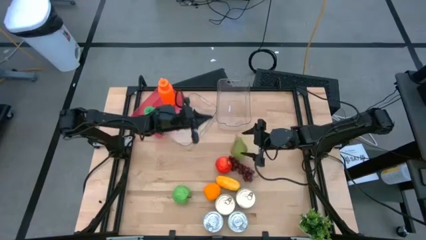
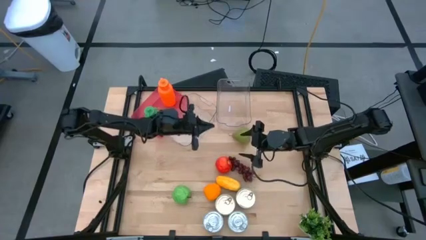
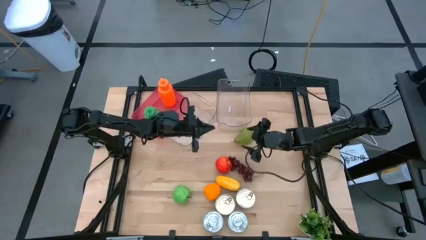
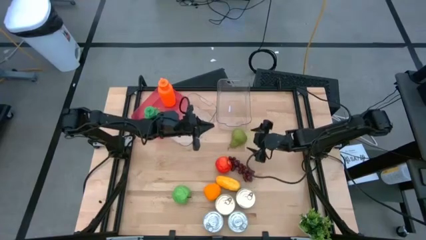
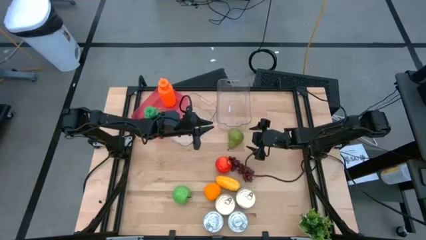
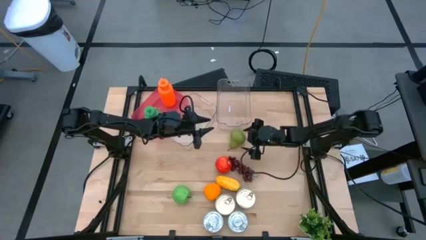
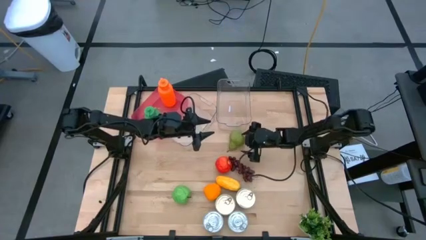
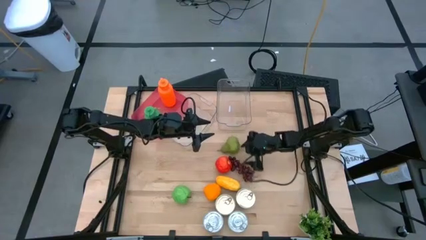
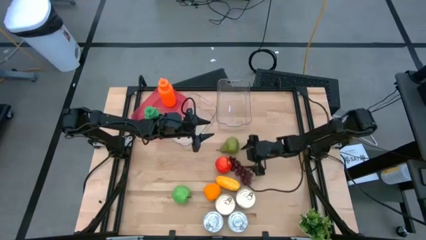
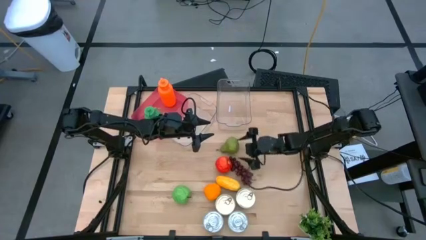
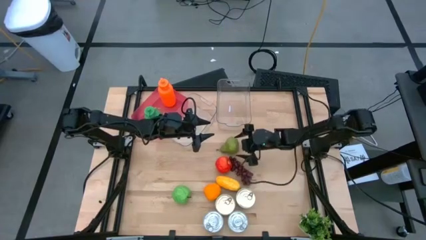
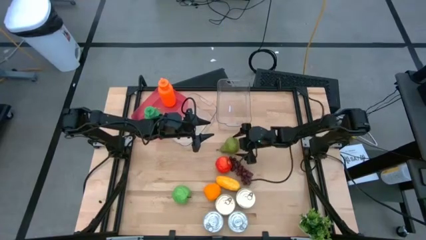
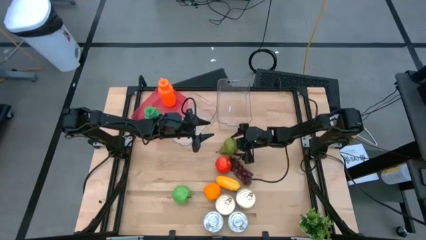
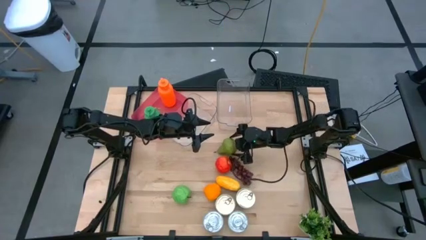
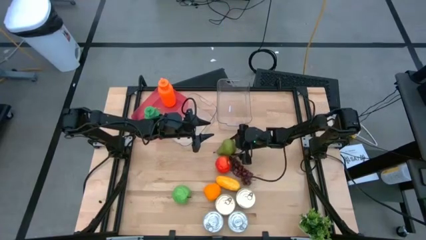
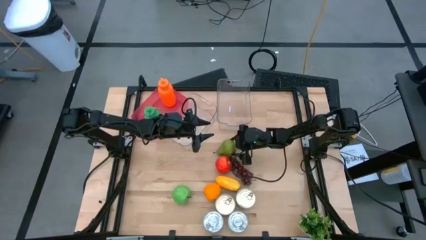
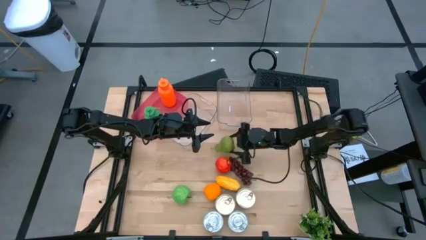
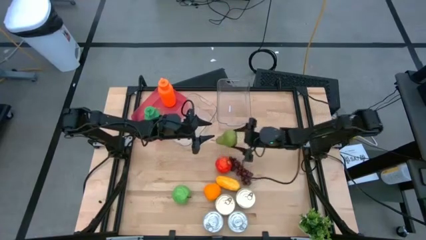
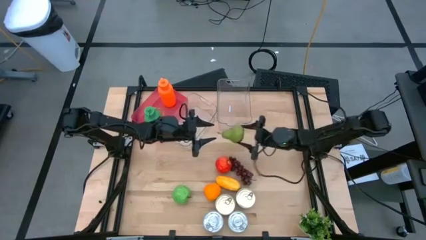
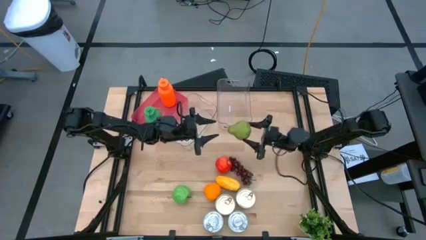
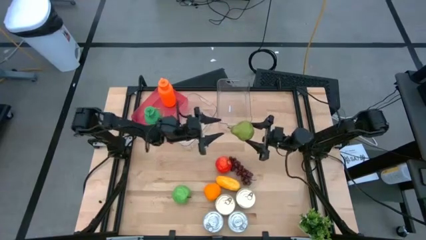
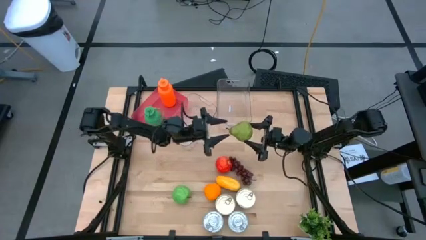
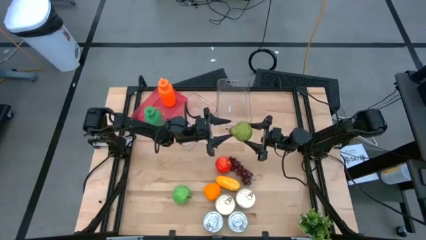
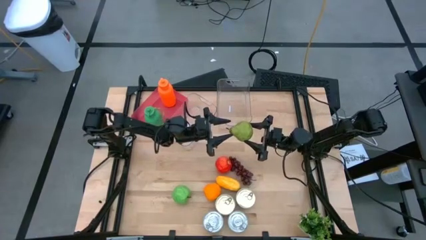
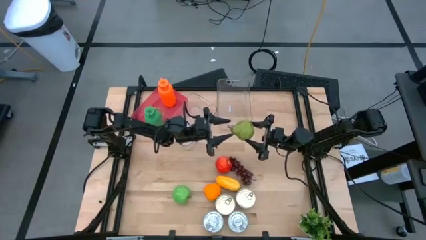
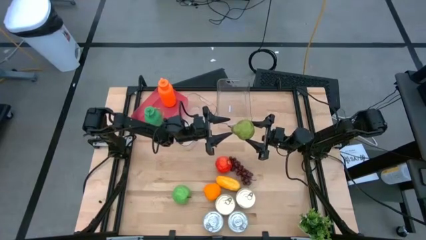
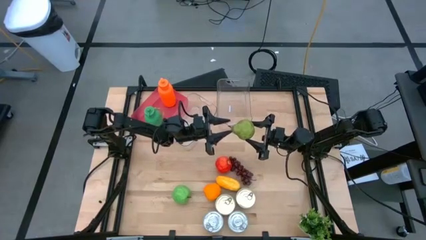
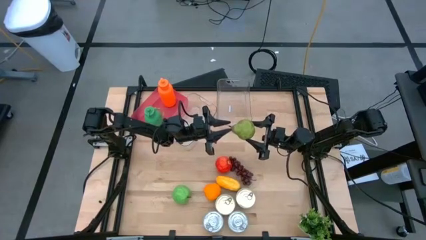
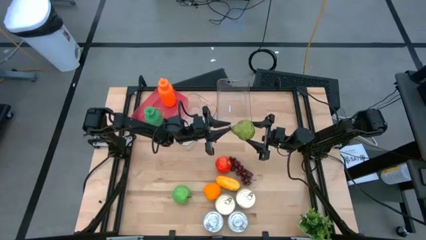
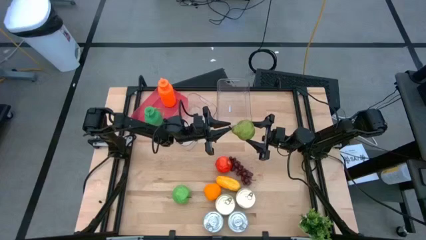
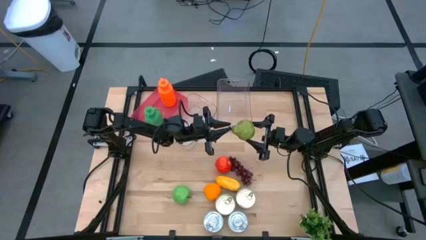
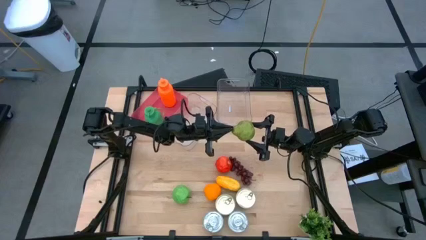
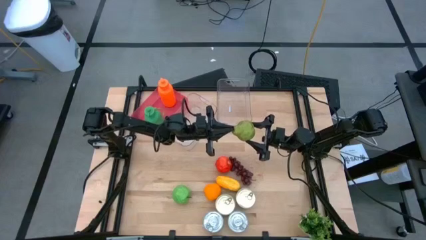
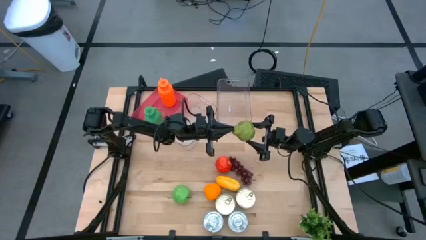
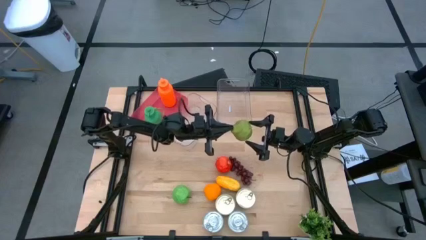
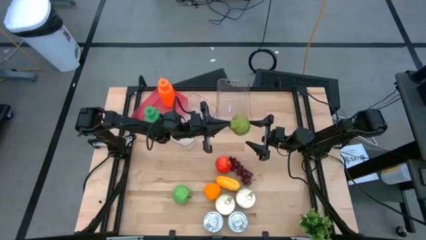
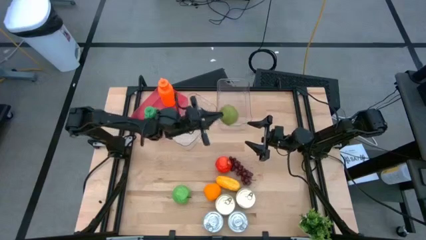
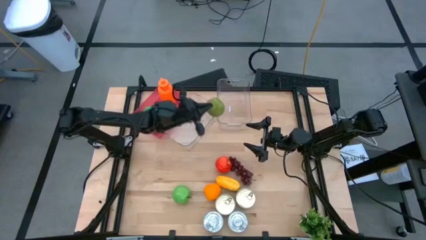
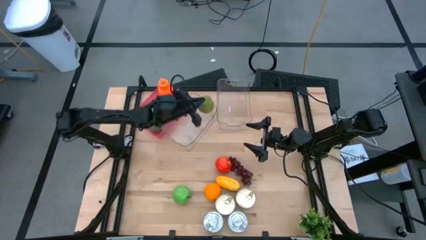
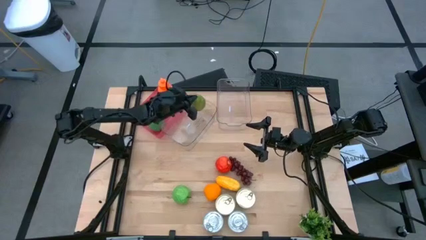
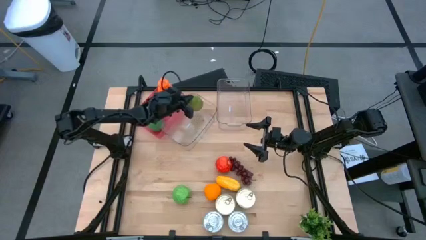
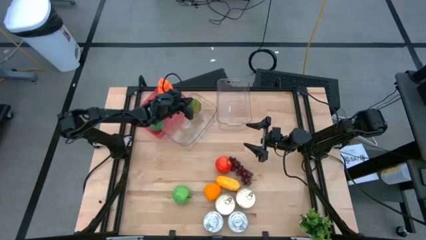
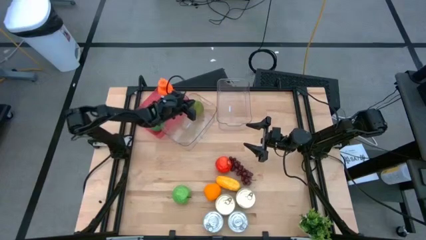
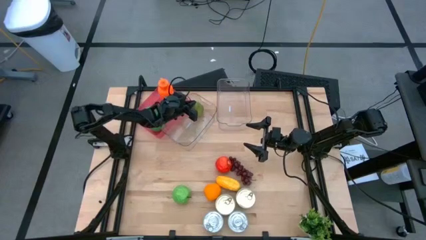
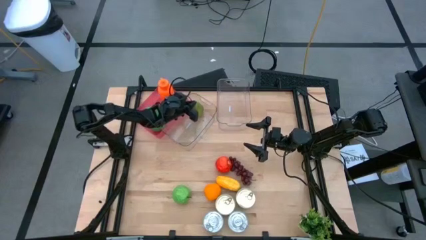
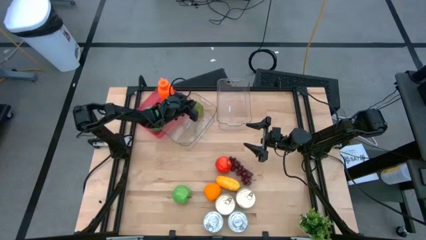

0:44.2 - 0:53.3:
Task: Pick & Place Food Item
Put the green pear into the left transparent bin

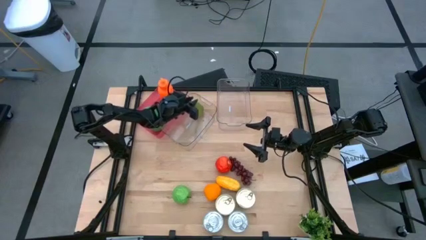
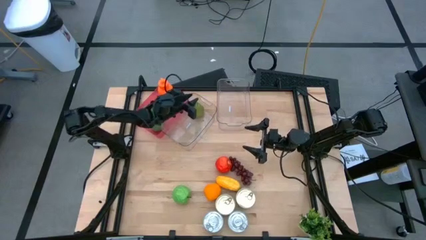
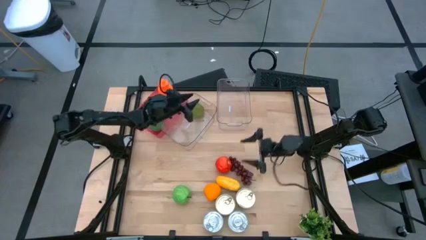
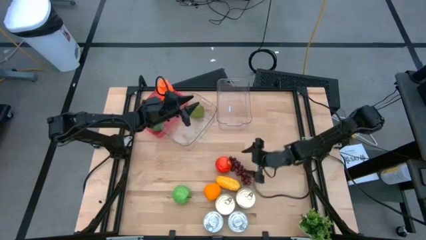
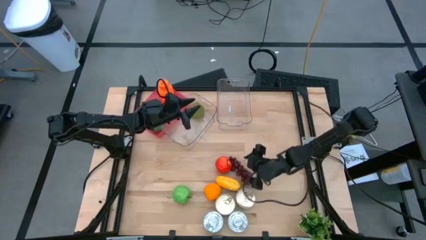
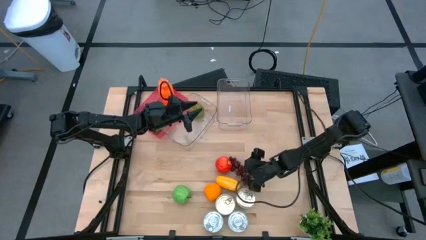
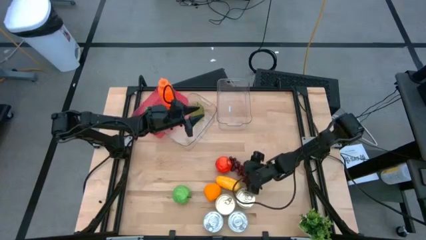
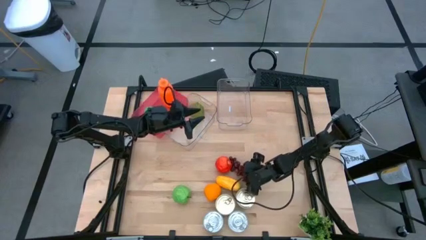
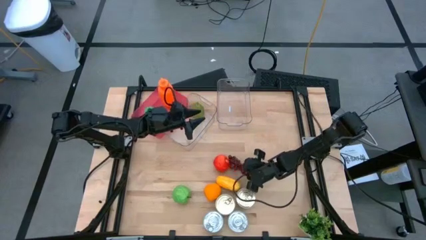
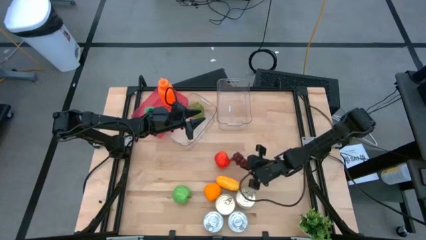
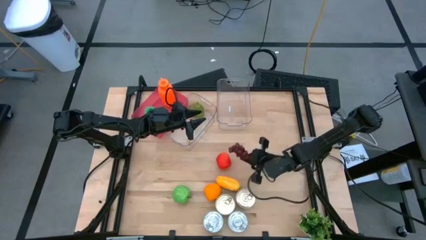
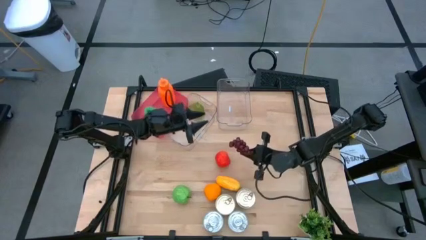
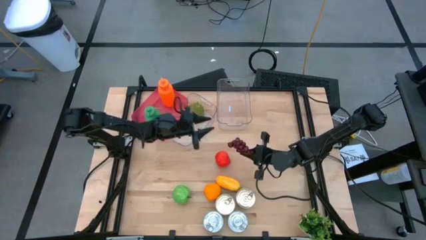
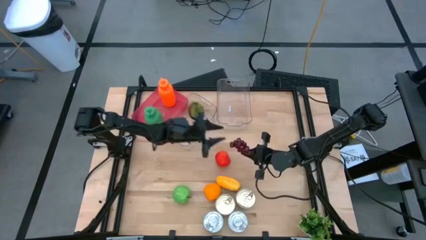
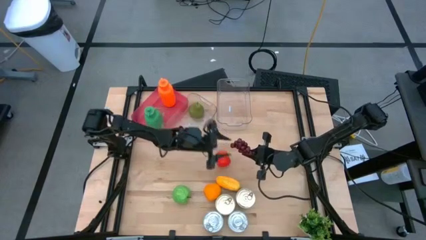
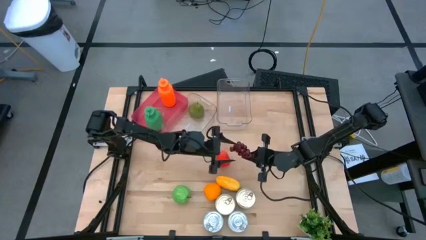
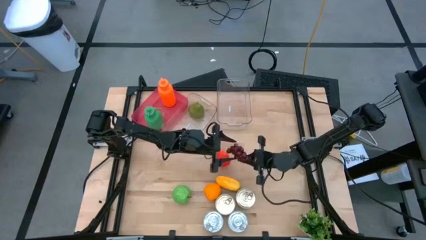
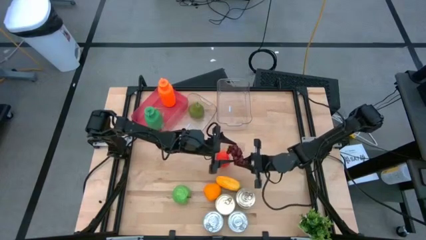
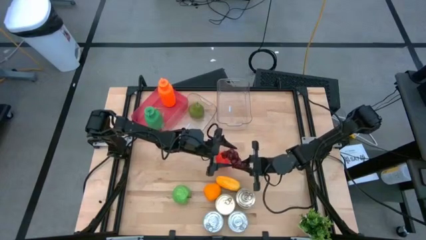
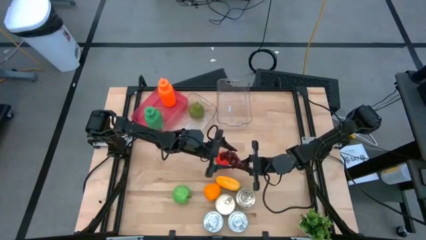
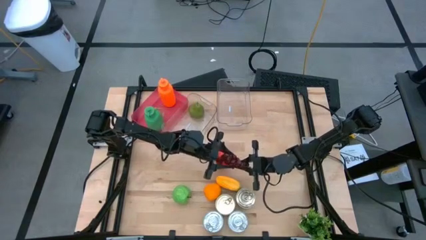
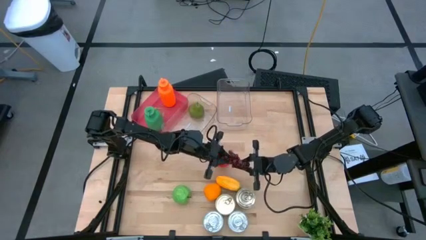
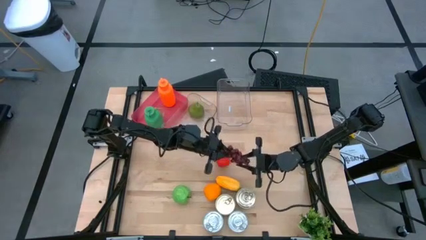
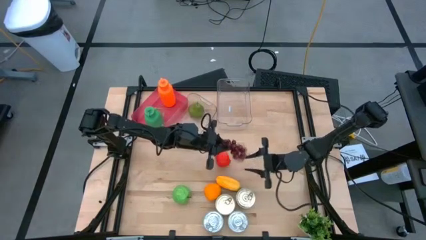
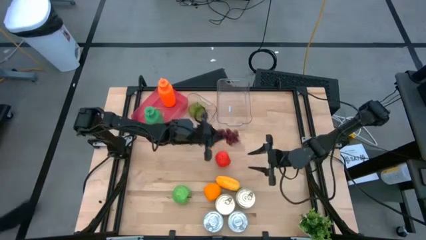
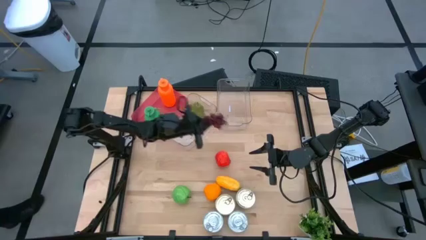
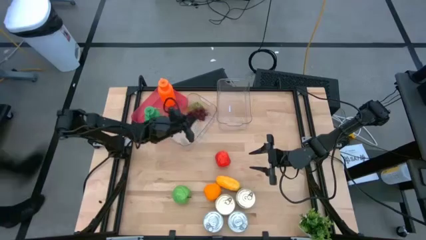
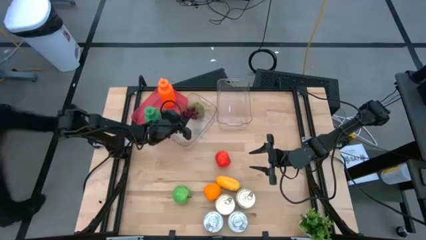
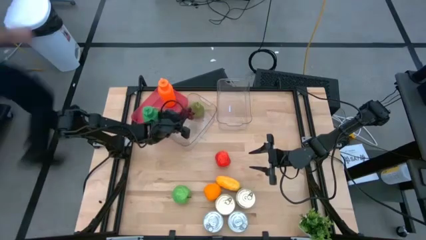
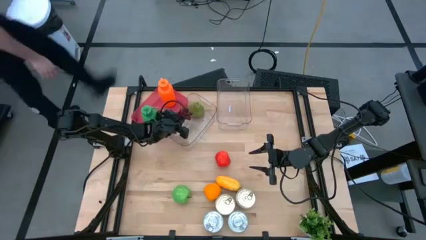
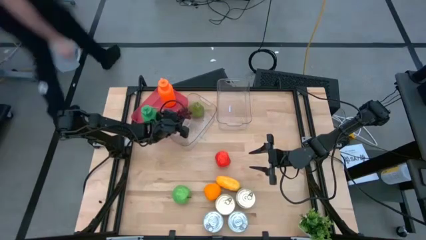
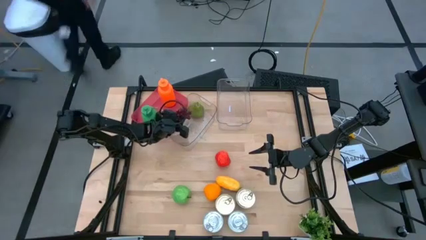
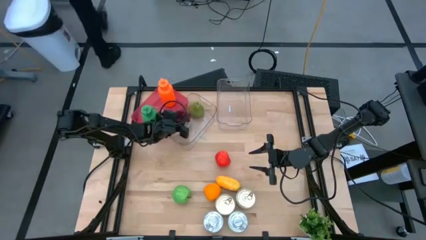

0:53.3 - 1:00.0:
Put the red grapes into the left transparent bin

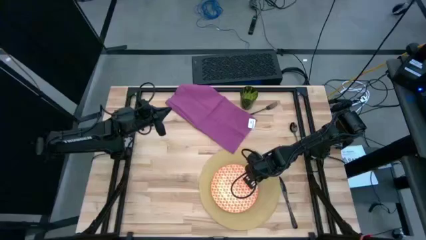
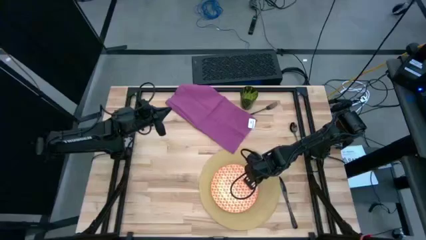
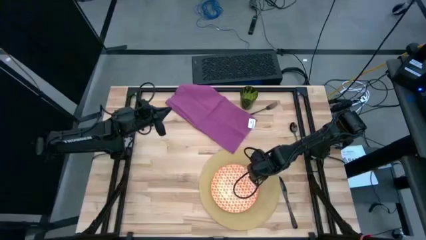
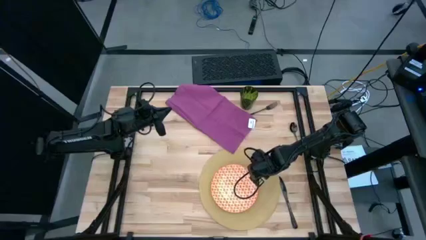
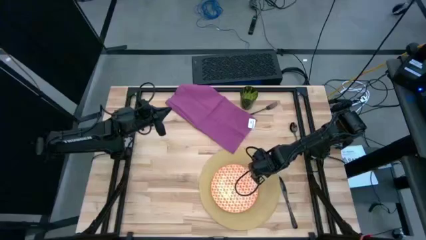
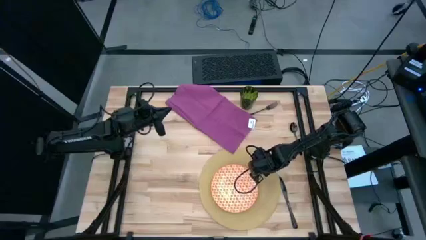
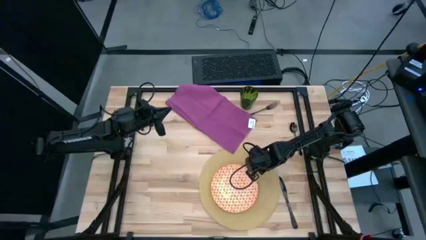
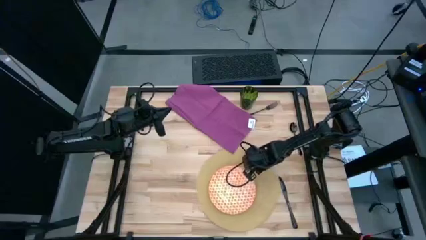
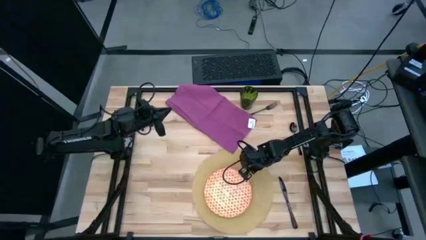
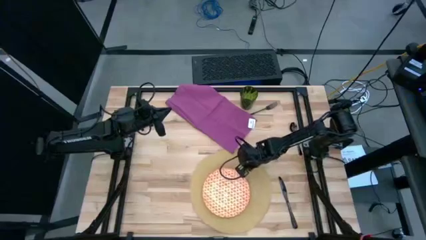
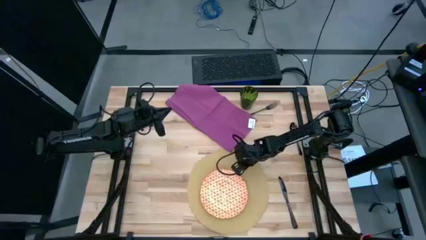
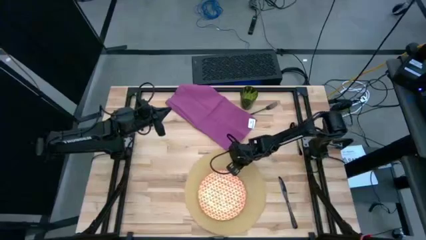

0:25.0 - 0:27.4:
Task: Set table place
Adjust the brown table mat
